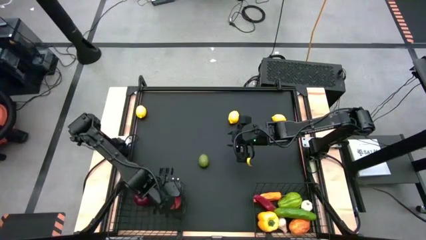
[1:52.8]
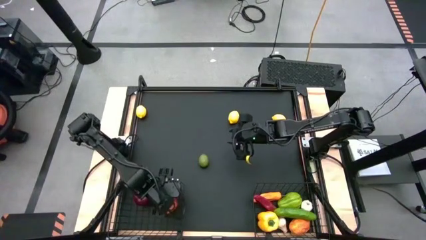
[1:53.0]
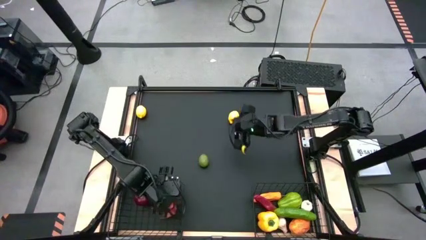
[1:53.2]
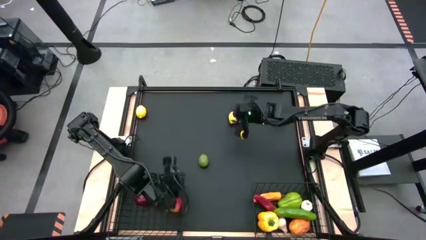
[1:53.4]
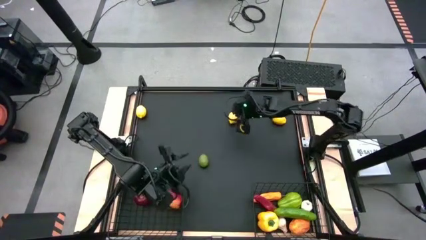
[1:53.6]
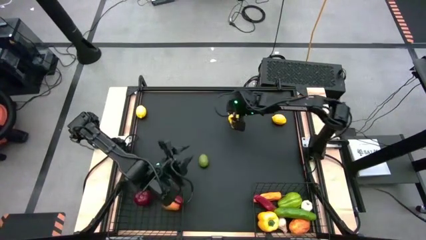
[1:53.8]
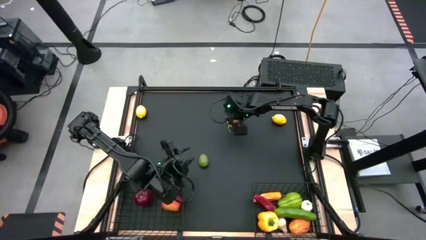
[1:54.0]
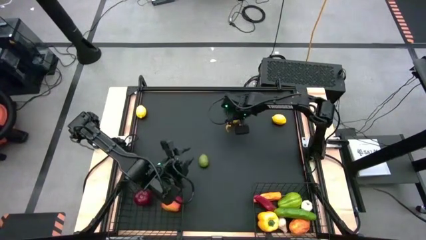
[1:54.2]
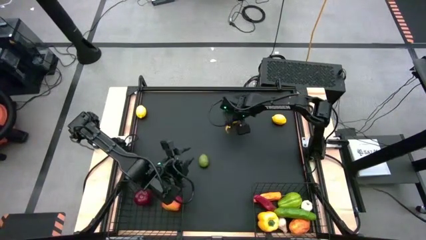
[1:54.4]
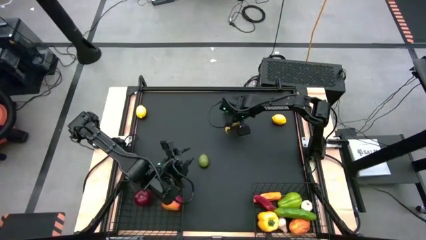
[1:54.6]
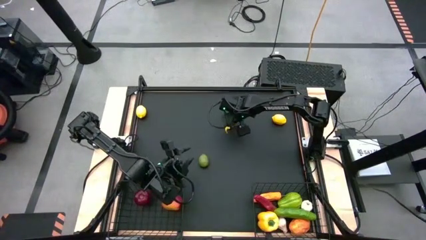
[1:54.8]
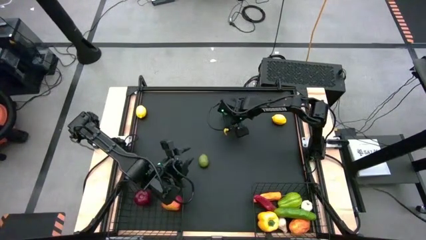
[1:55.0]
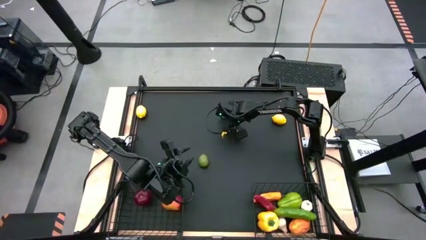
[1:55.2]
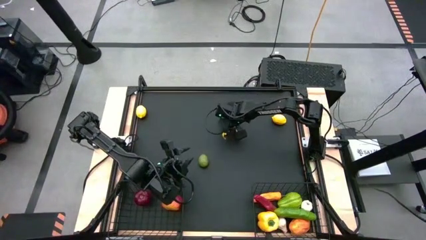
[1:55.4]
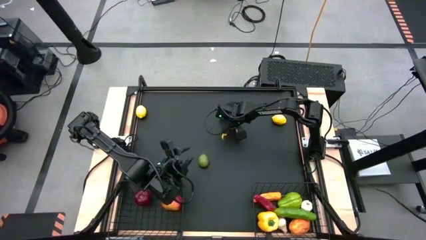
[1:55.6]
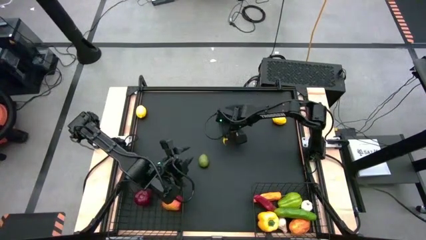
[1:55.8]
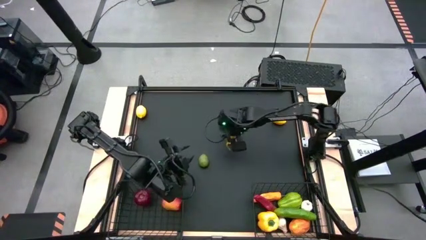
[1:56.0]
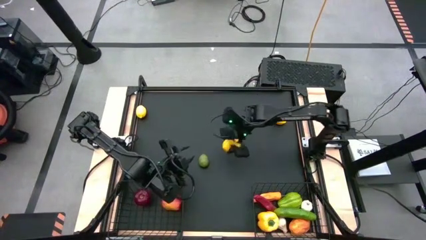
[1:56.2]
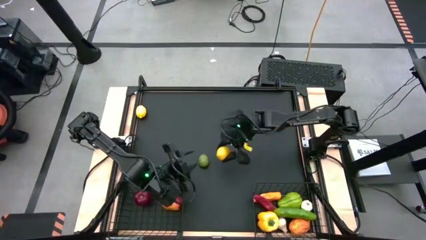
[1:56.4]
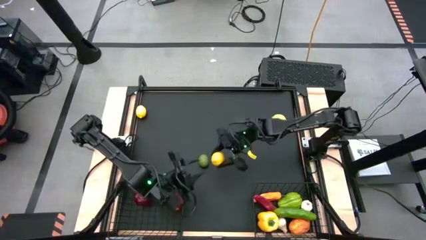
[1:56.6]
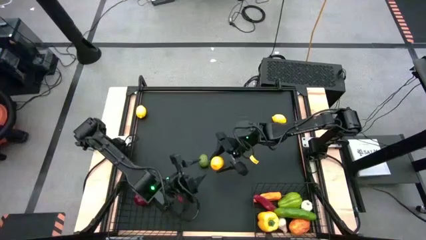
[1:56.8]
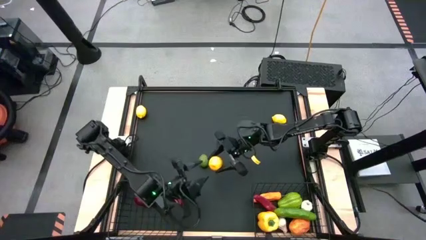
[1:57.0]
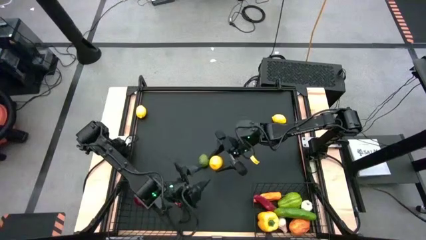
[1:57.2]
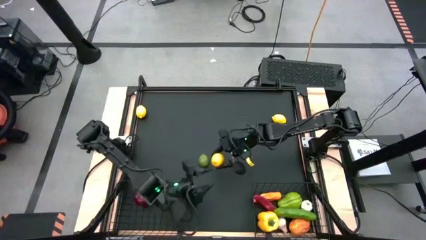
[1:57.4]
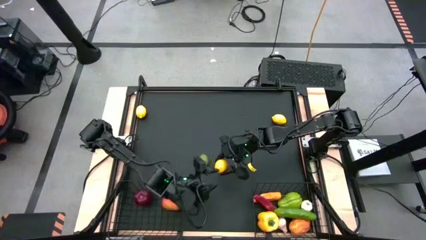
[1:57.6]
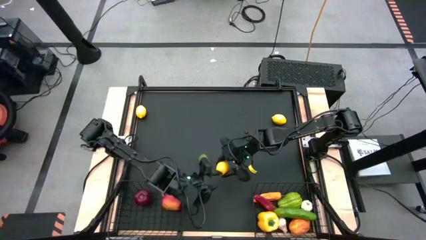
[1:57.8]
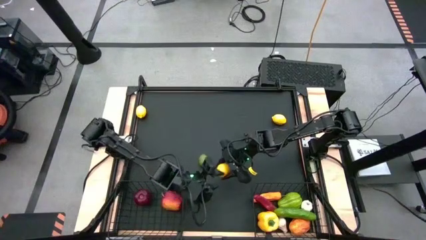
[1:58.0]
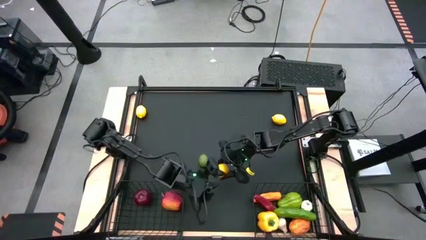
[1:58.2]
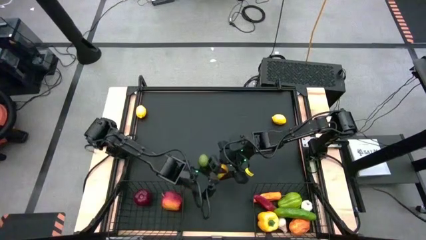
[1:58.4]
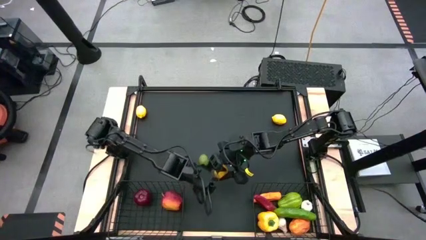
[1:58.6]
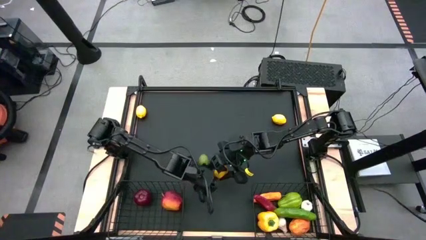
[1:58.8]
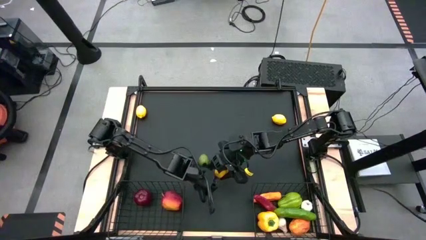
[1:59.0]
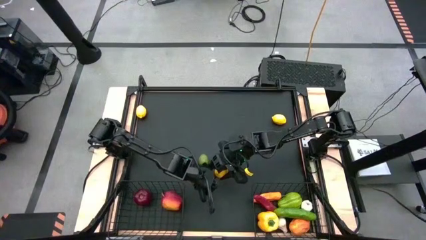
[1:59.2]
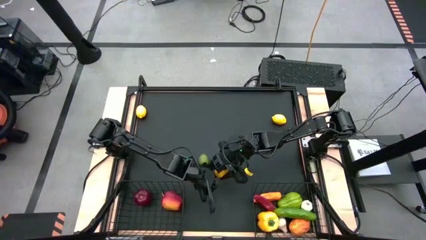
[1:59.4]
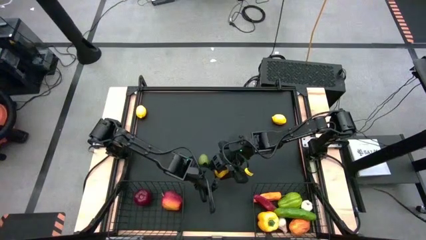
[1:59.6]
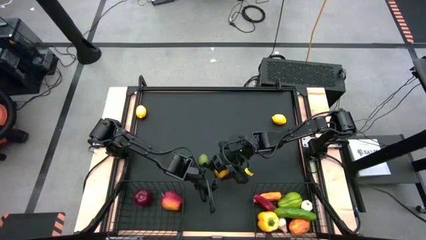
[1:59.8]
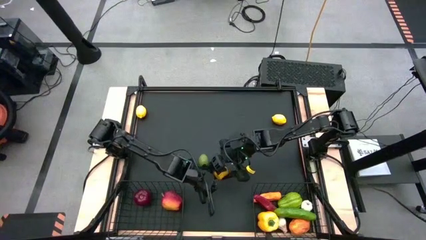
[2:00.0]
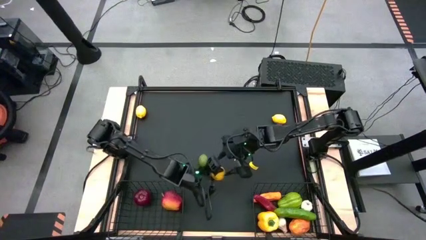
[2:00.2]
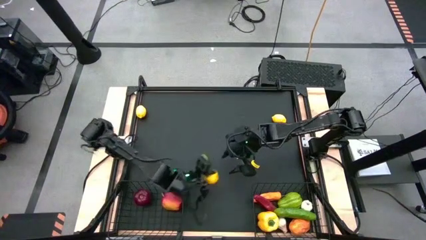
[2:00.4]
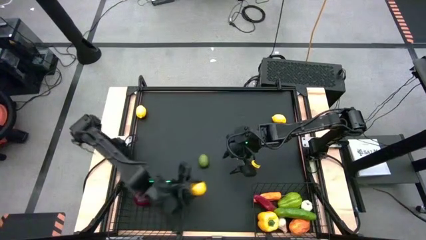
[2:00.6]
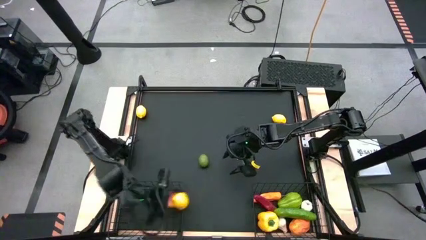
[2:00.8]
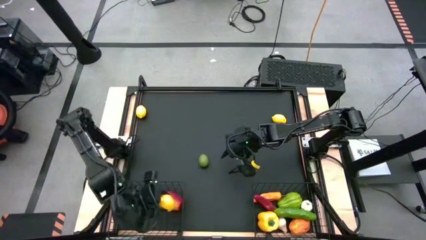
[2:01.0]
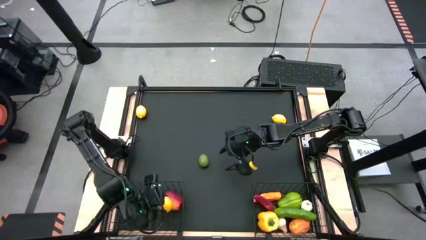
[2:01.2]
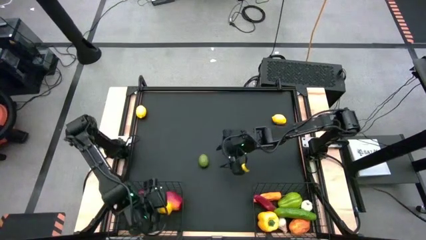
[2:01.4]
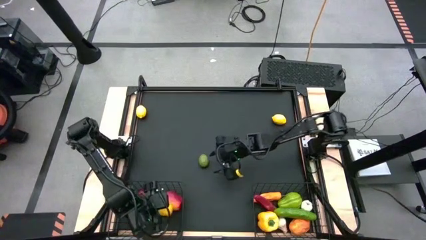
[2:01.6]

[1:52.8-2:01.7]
Task: Sort produce into baskets
Put the center yellow lemon into the left wire basket

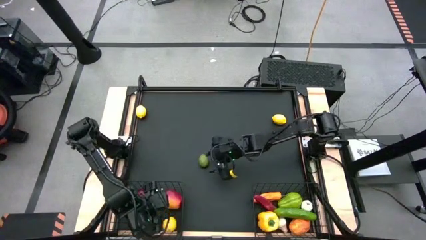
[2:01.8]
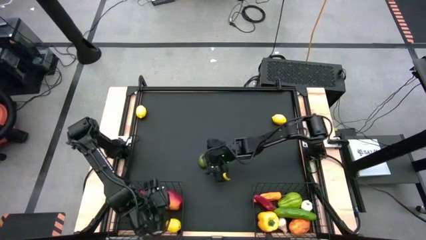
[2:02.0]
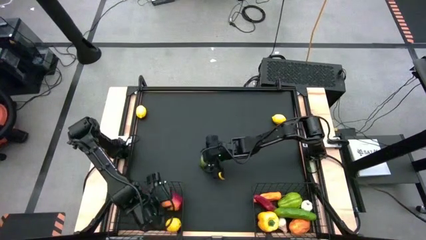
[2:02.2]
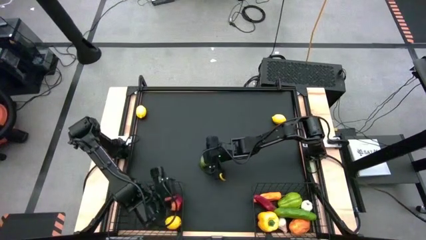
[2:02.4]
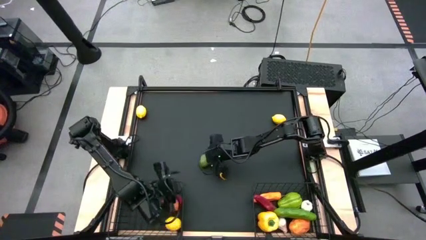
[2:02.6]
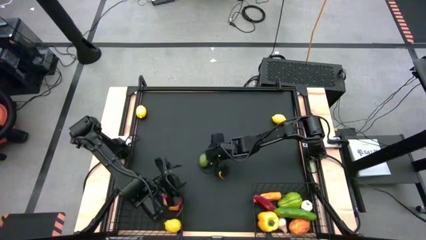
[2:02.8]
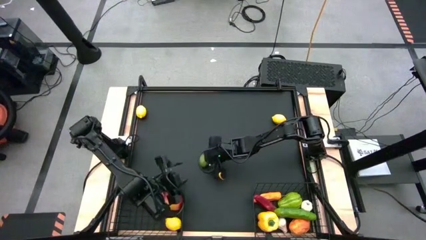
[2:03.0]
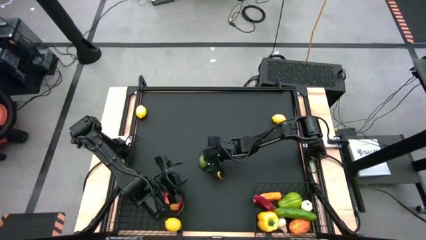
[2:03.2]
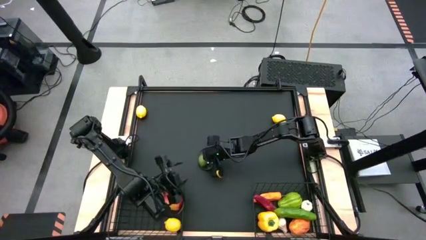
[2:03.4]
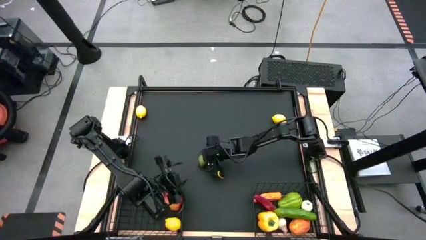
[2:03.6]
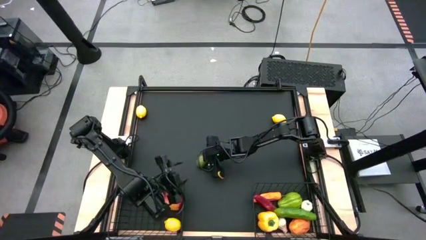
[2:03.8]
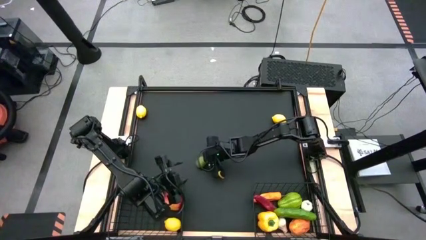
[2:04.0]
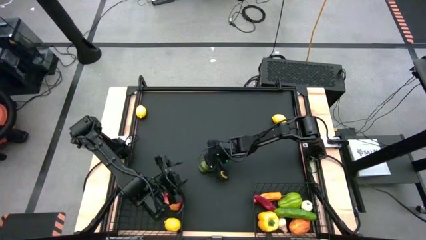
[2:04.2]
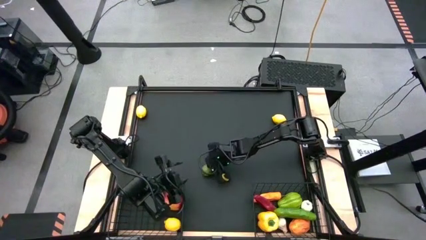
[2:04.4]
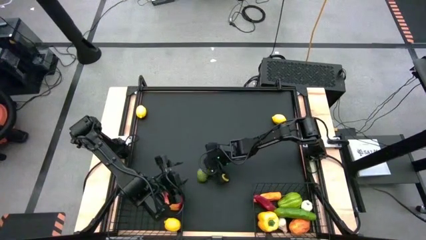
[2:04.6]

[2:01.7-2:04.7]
Put the green lime into the left wire basket

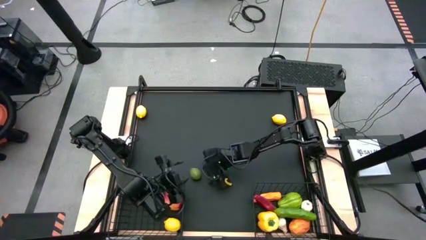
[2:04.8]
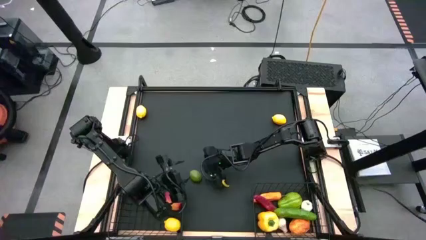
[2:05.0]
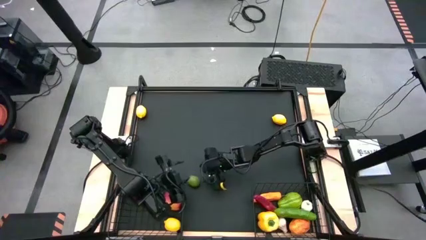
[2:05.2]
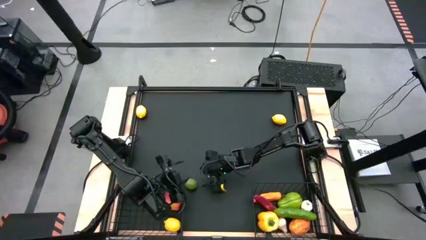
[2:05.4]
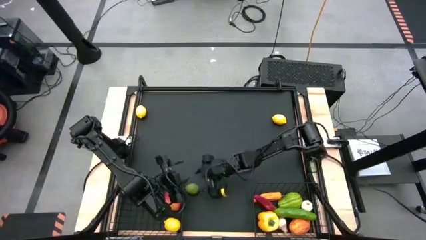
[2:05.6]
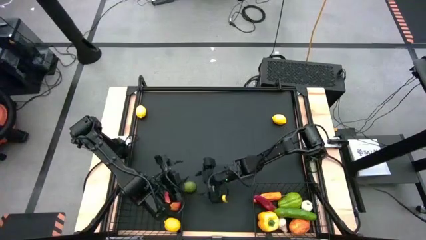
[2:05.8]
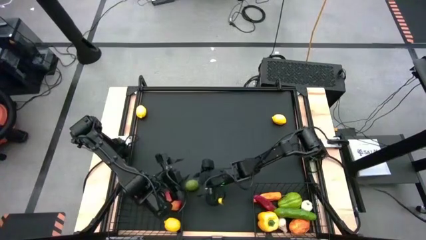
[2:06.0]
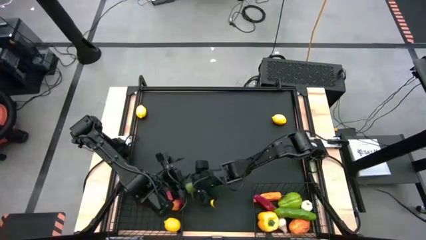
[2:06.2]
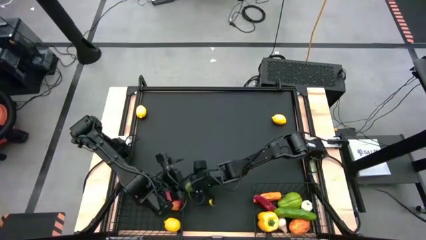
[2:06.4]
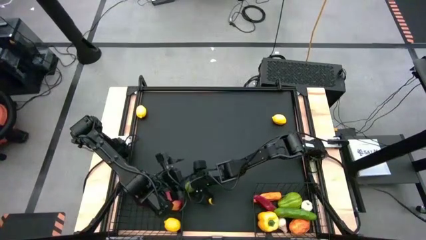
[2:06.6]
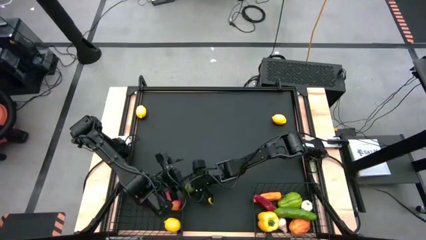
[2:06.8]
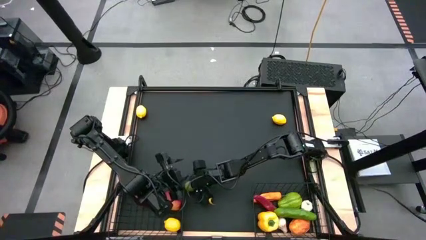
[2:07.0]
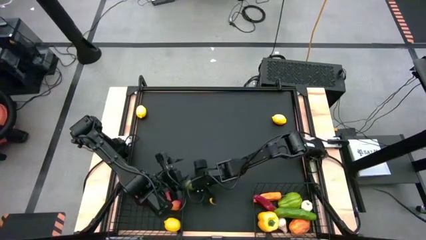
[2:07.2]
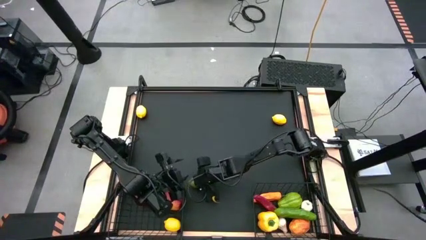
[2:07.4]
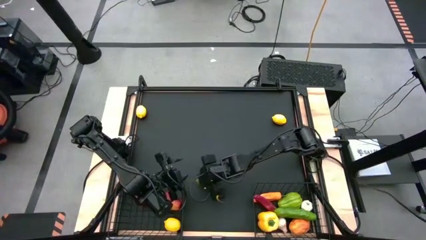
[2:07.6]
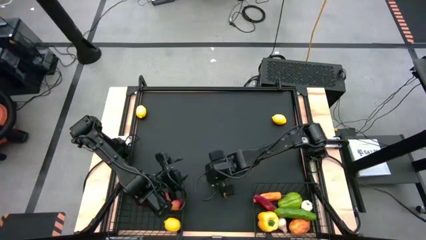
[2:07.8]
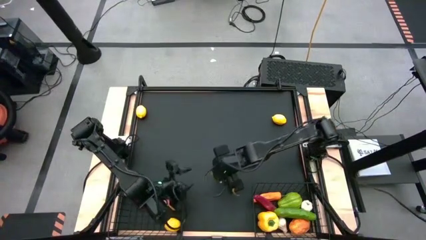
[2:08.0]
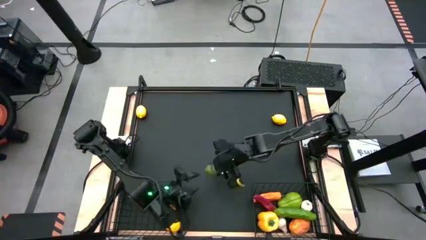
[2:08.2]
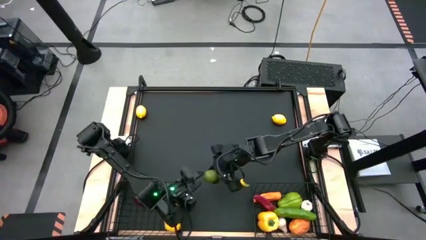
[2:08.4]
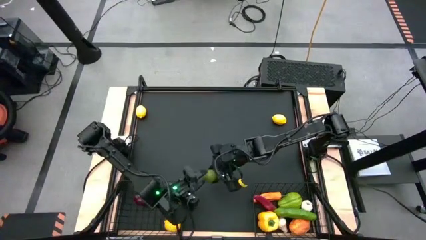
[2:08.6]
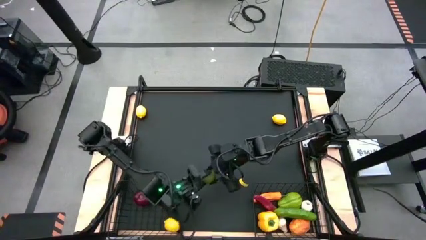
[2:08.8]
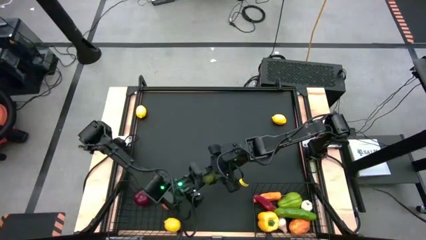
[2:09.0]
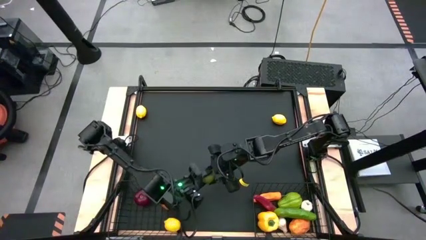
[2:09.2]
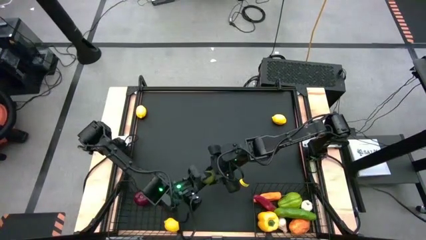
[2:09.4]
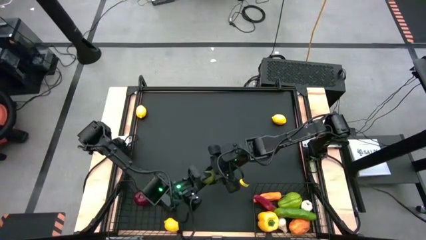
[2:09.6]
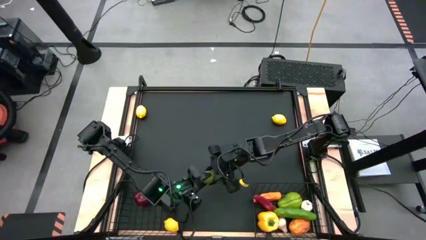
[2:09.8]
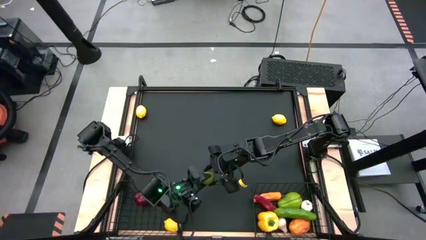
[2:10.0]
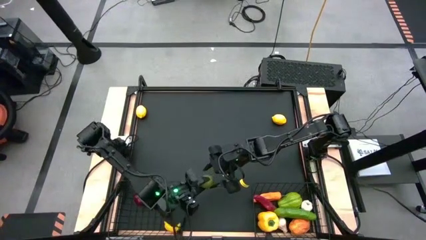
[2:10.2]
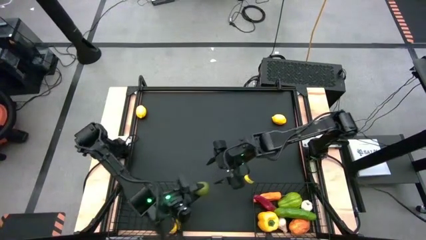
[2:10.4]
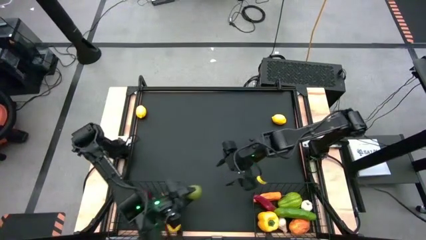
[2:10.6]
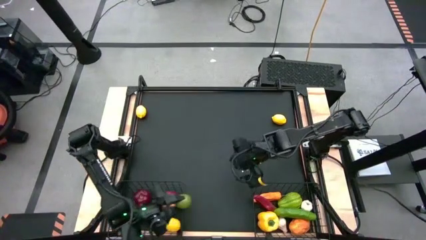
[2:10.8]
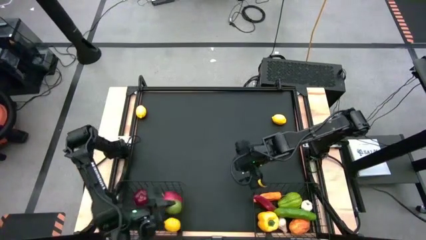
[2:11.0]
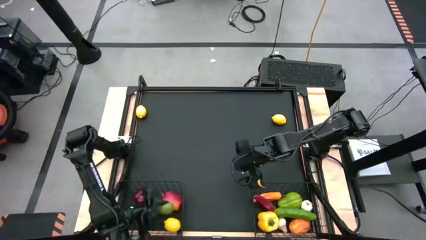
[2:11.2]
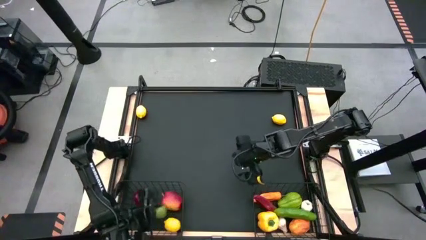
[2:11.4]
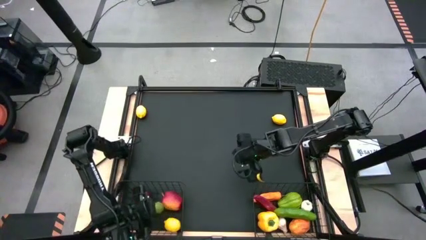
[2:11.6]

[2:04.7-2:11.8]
Put the green lime into the left wire basket
